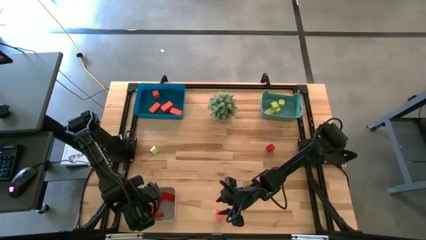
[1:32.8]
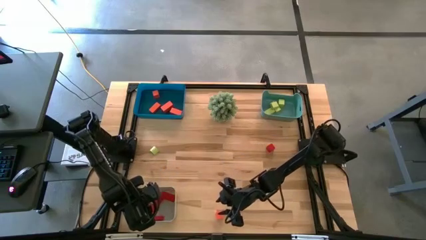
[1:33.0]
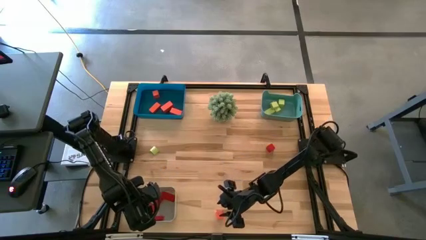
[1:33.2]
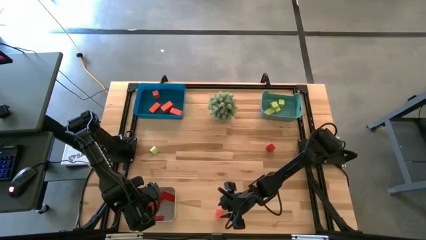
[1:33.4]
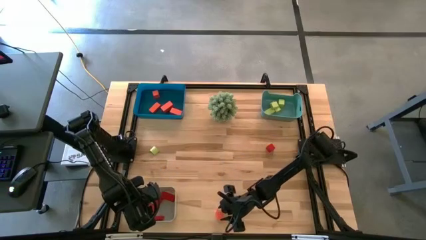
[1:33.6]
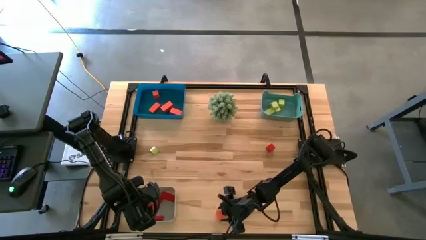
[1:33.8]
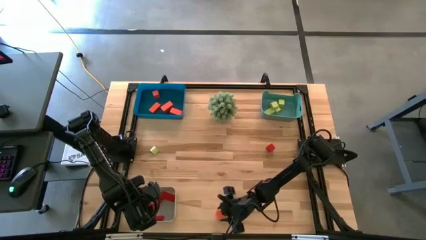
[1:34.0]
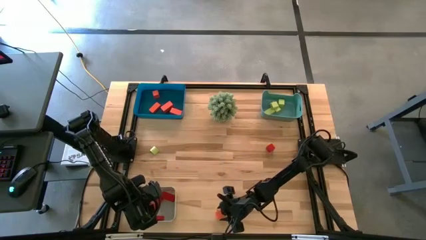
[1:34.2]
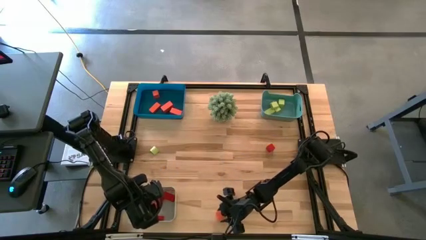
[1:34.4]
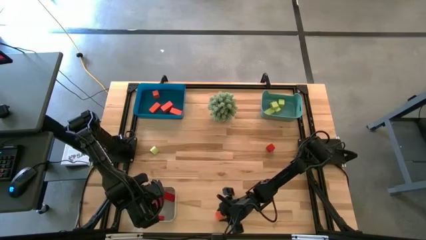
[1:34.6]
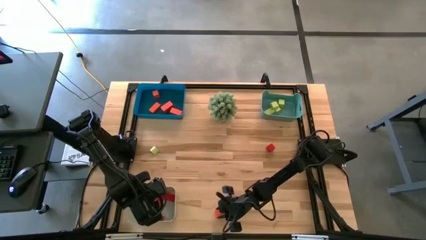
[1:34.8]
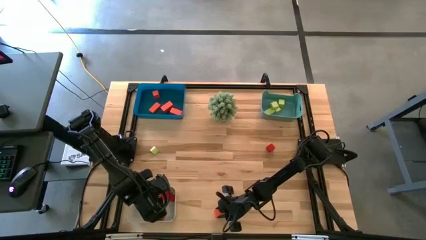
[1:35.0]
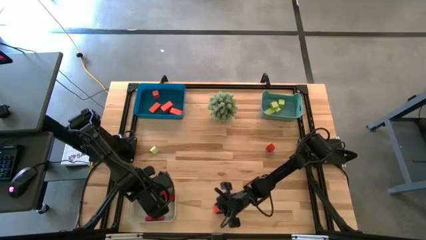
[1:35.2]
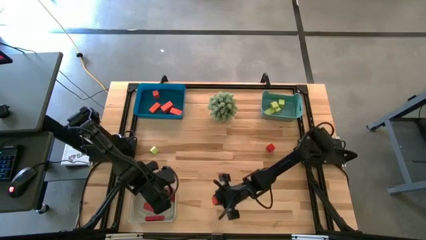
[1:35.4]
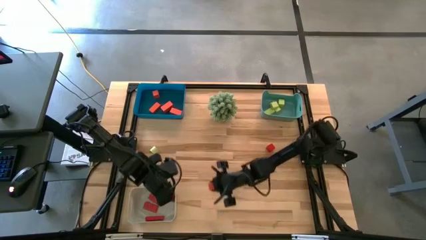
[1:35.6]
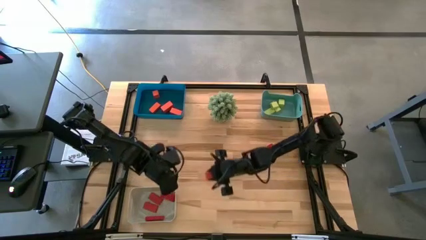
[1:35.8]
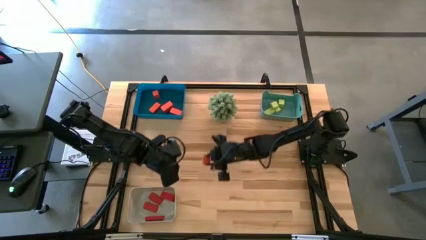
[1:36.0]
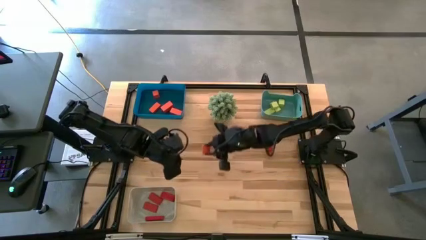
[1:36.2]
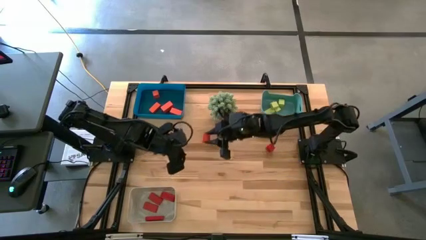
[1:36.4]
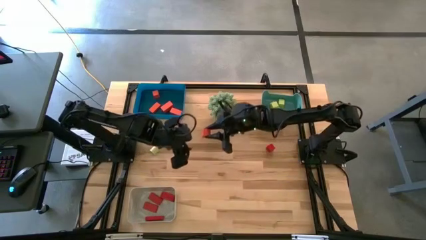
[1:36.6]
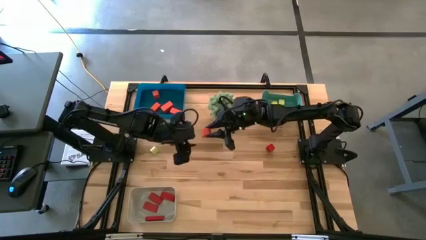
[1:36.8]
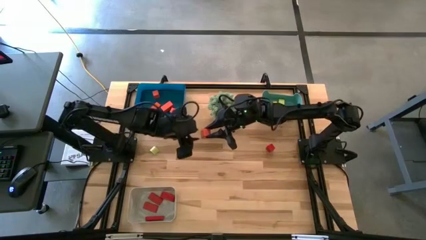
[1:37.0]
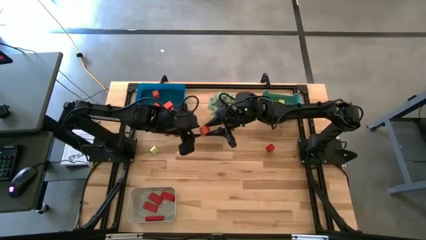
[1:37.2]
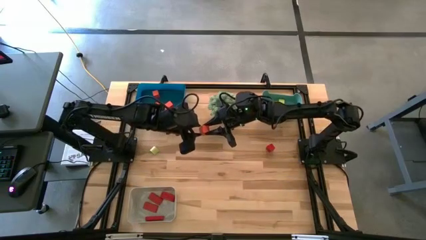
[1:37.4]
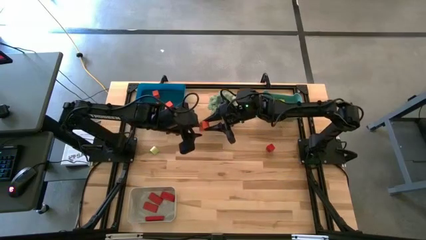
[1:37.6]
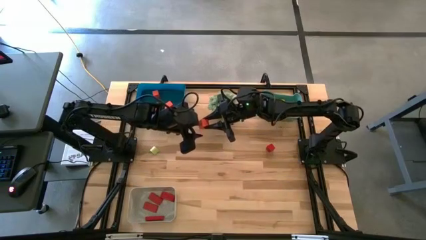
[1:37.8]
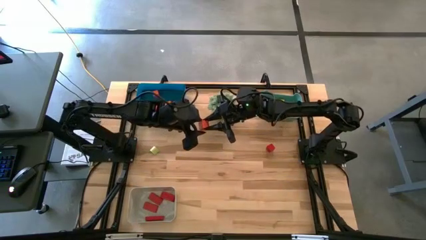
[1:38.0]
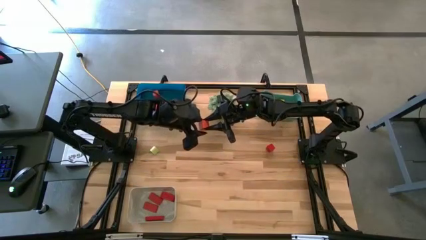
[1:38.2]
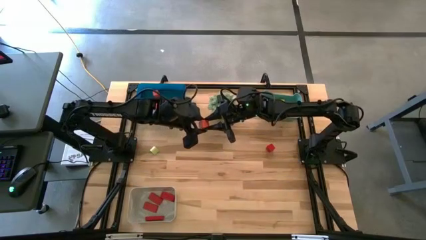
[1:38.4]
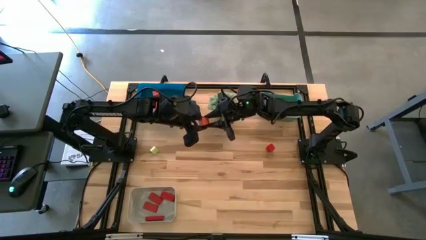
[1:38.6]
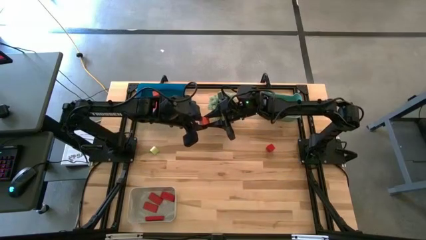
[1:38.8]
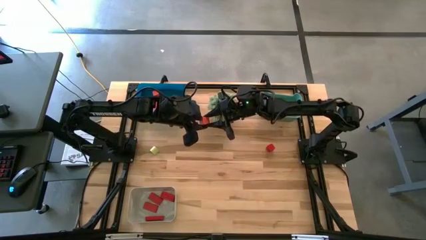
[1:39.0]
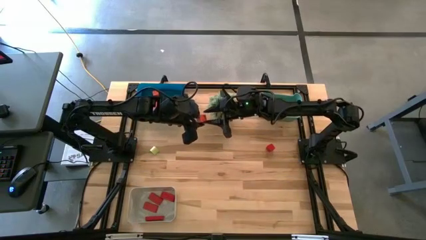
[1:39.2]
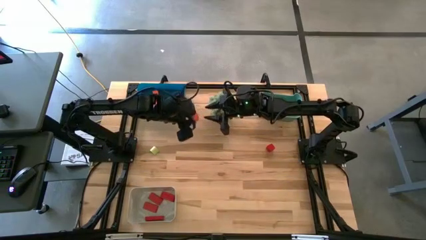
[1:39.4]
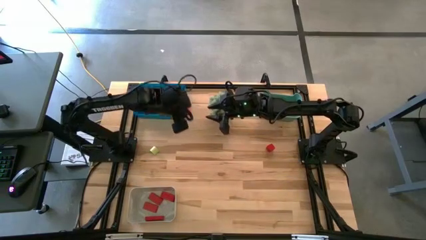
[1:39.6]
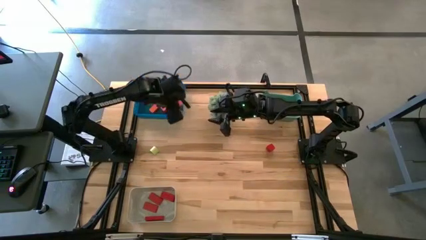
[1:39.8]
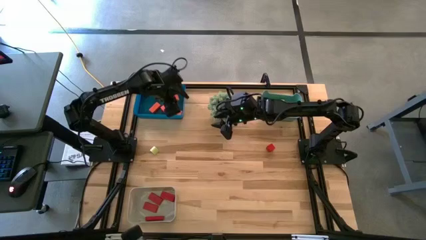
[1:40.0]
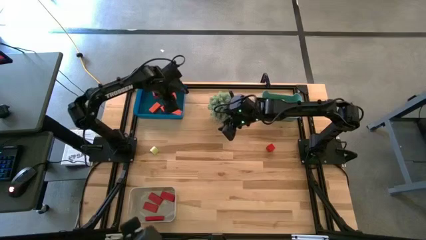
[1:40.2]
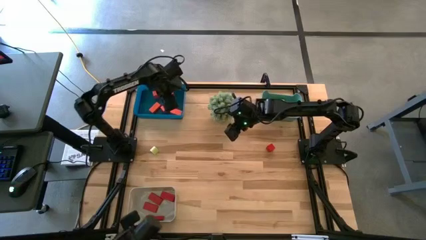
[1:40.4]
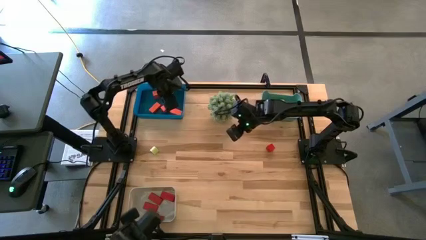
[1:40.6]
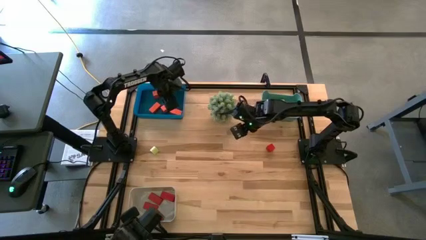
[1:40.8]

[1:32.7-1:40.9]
Task: Sort & place blocks by color
Put the orange block into the blue bin

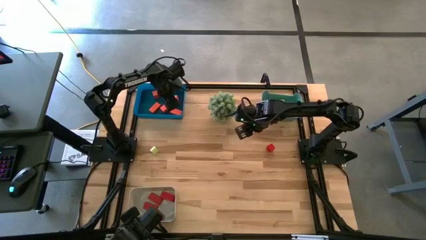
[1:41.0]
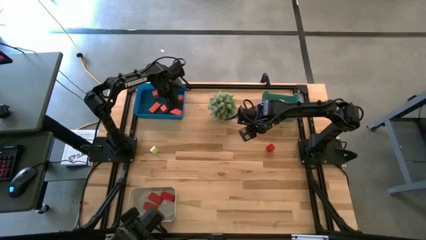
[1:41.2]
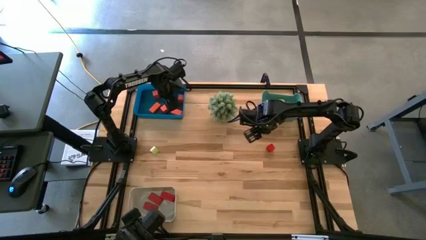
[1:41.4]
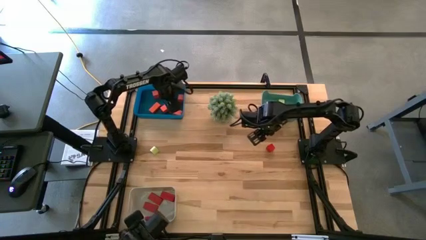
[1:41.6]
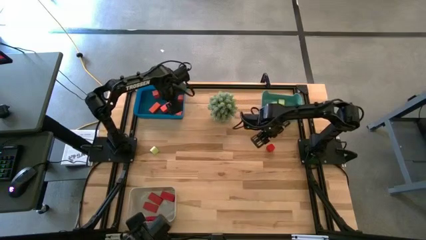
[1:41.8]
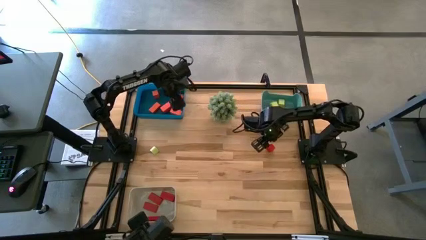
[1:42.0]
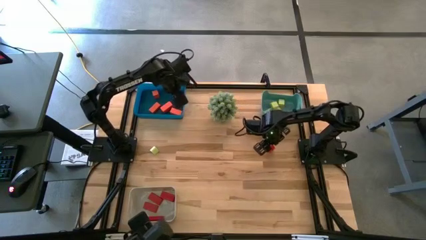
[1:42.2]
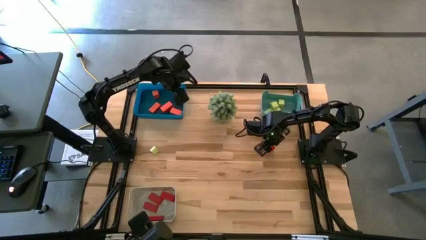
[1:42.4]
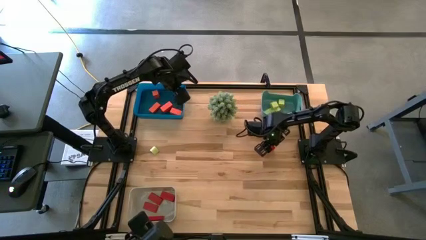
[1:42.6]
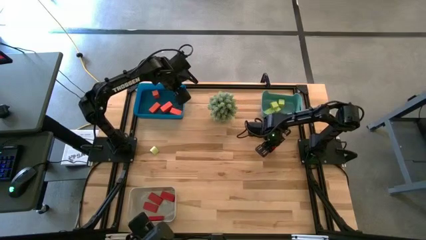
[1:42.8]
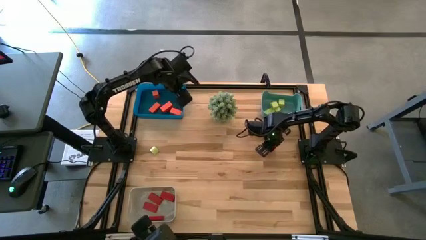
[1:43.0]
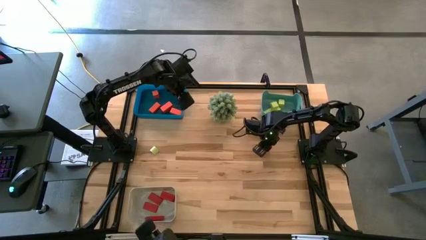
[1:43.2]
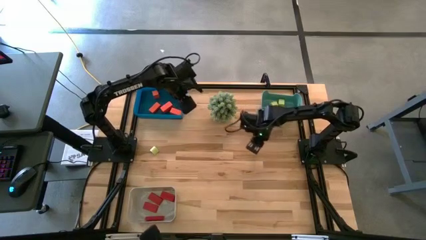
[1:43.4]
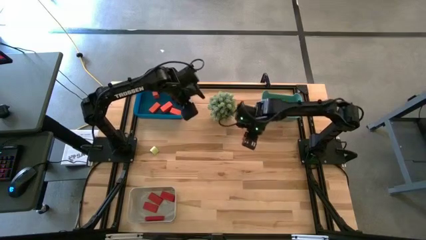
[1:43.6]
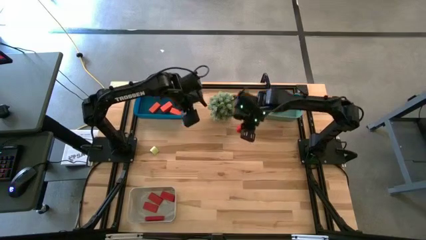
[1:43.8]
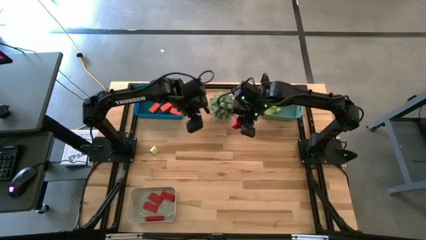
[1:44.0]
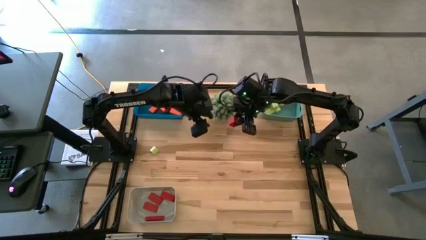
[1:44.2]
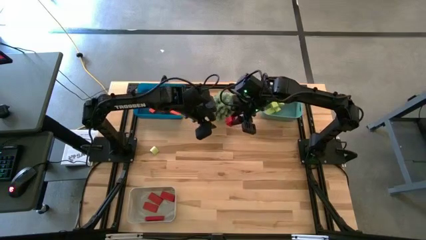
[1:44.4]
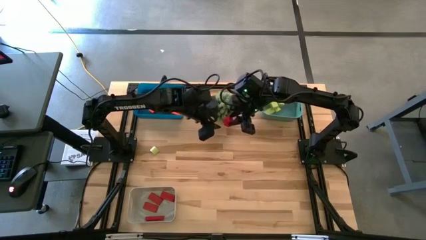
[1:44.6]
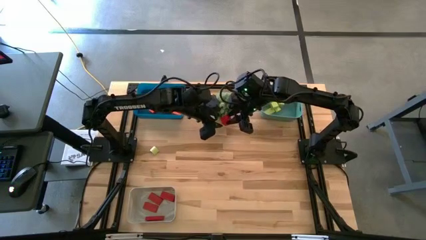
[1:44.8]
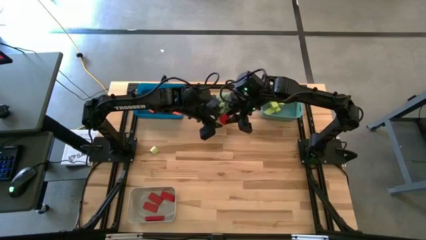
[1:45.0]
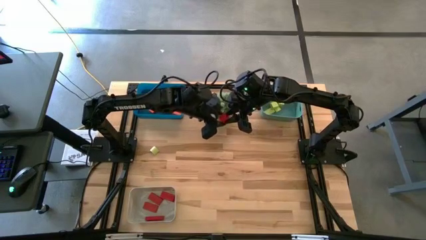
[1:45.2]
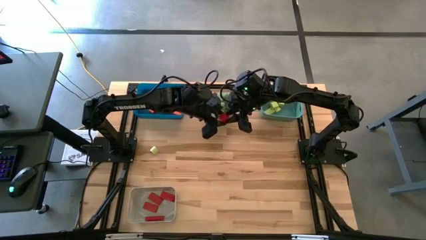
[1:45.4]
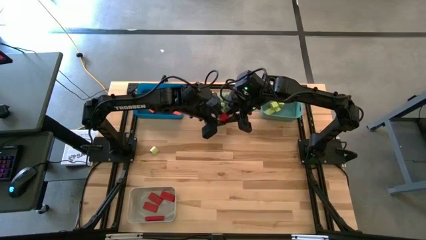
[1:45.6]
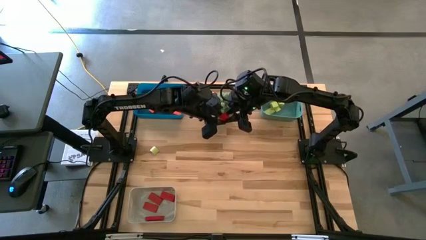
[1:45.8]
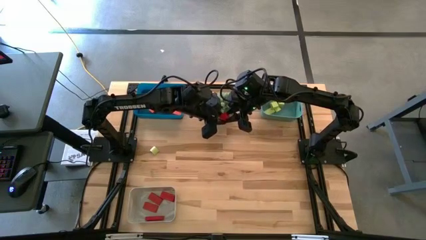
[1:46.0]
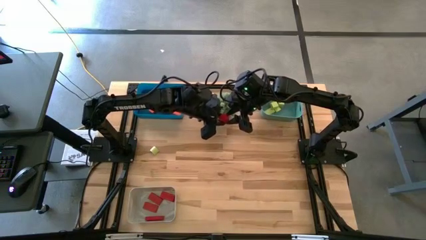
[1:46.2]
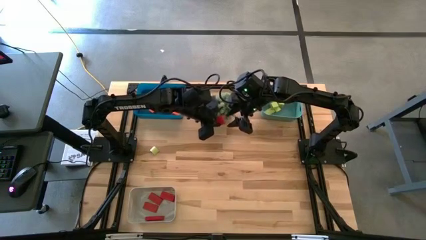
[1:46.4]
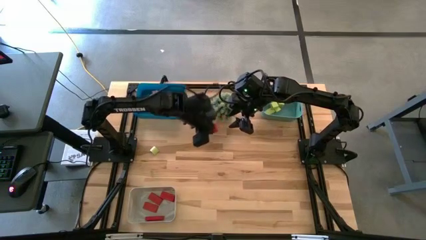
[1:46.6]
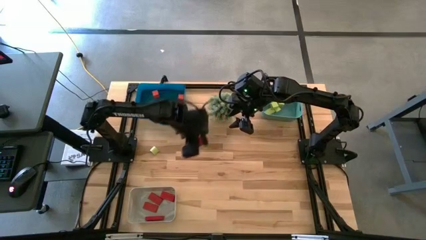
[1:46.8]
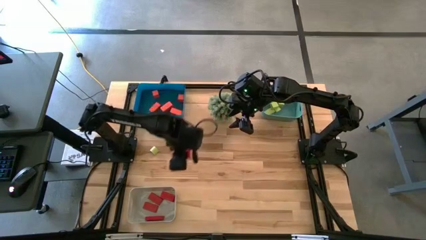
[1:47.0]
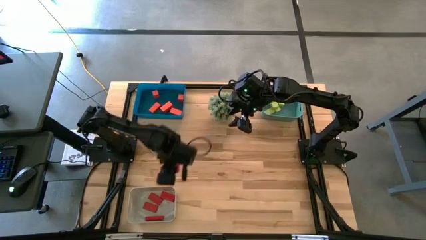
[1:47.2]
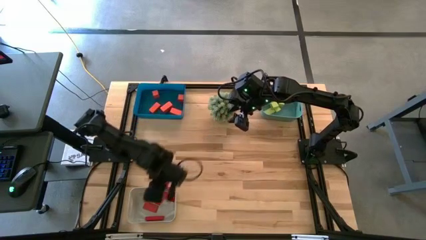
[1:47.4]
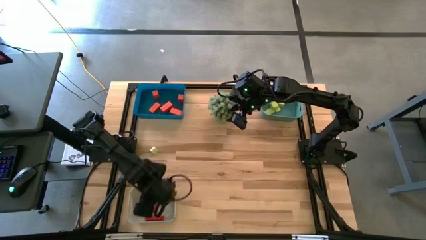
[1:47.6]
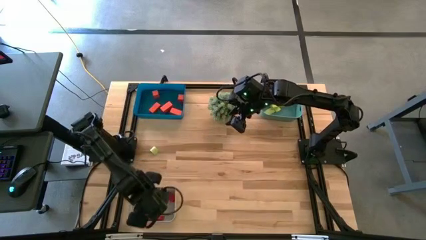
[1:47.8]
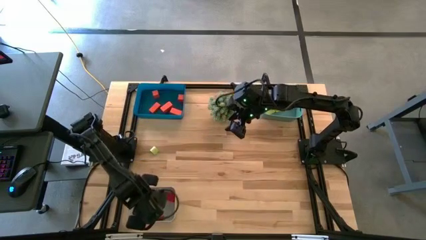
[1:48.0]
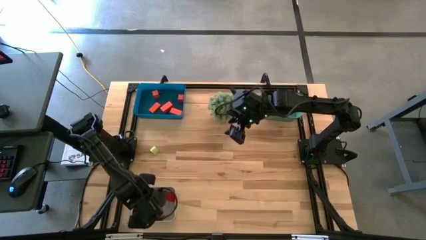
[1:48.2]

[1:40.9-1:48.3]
Put the red block into the white bin

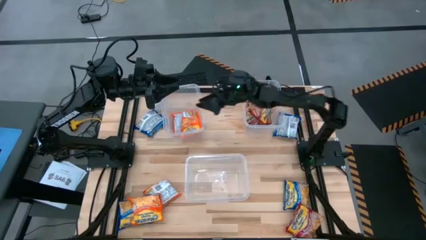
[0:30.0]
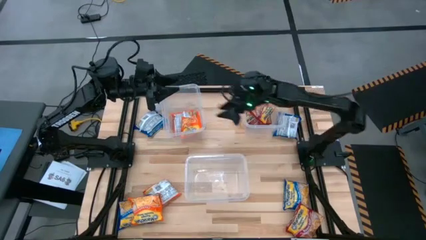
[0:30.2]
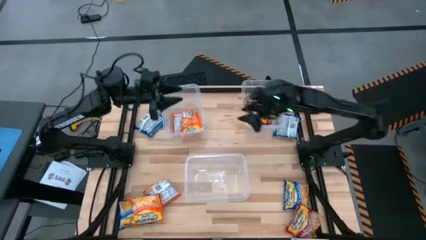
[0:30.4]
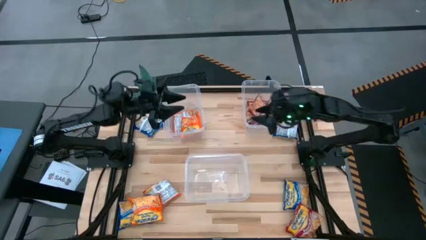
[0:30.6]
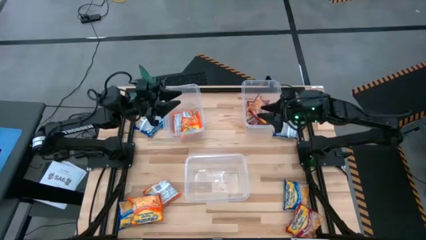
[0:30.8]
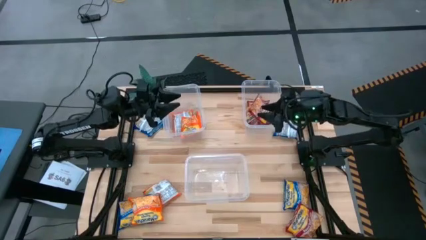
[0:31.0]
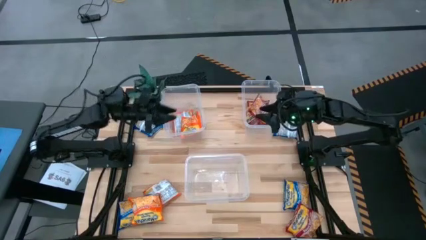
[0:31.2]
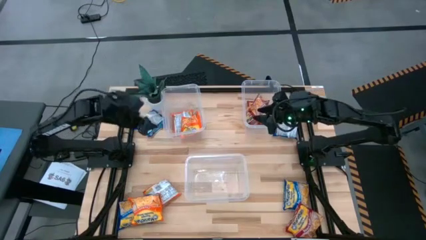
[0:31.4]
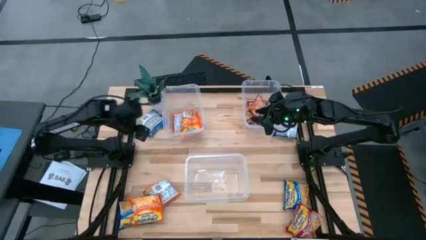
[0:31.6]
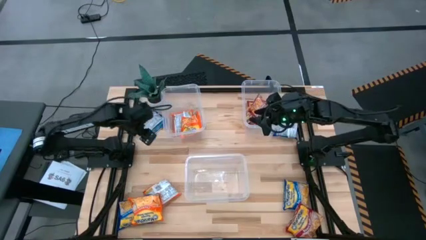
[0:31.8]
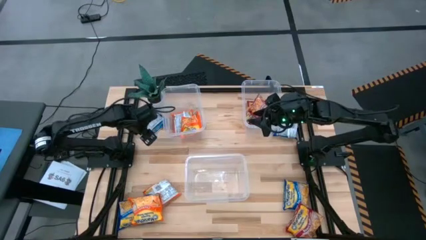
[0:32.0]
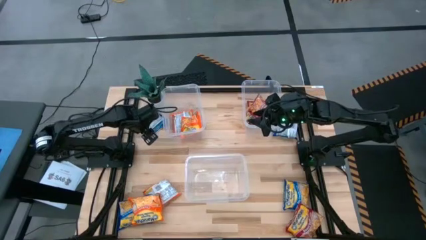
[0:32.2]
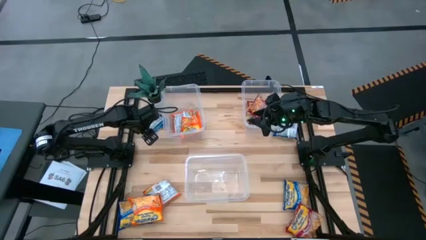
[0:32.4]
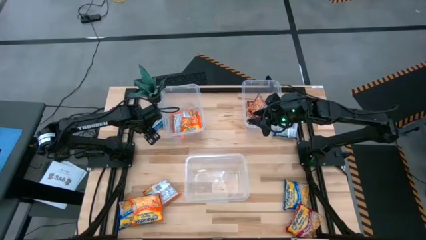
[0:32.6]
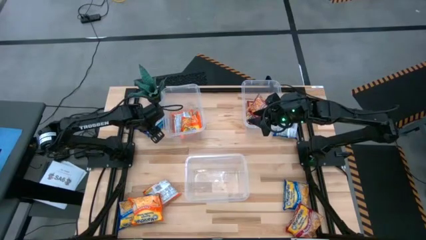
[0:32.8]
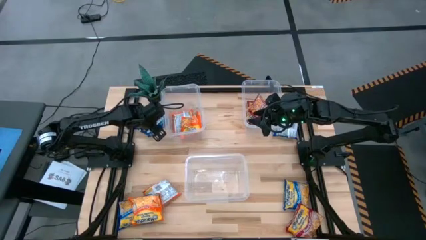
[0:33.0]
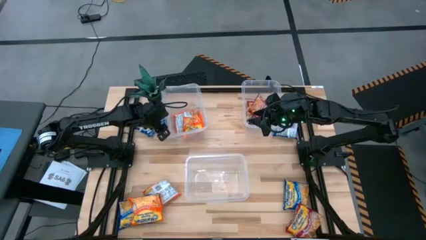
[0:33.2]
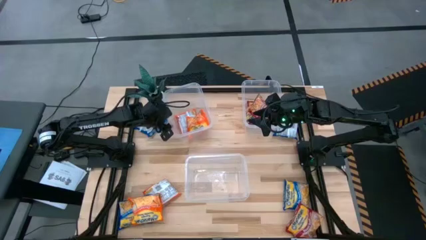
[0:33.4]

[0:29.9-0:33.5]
Task: Sort Maruchan noodles
Adjust the top left transparent bin on the table
